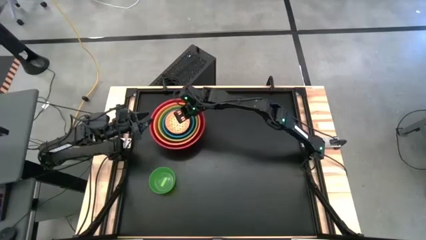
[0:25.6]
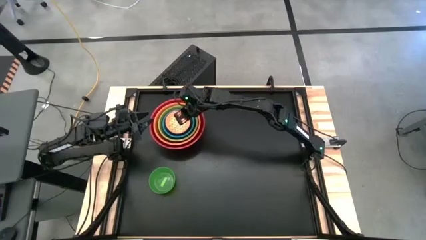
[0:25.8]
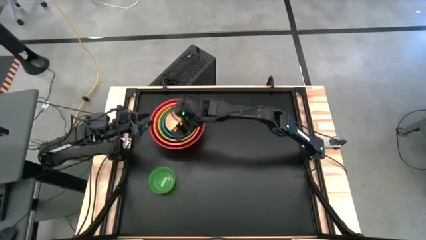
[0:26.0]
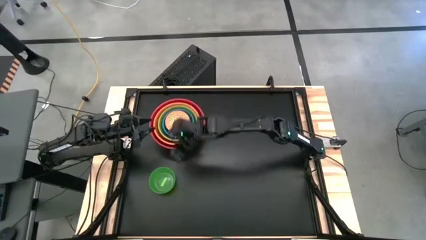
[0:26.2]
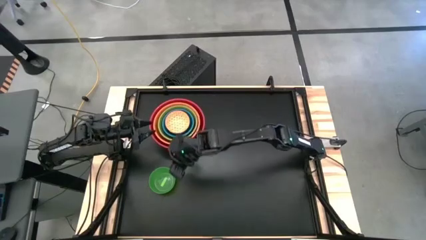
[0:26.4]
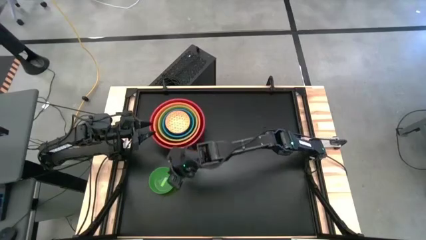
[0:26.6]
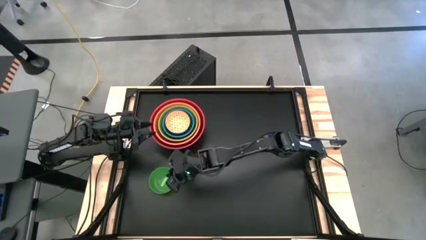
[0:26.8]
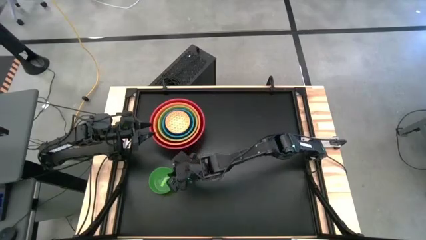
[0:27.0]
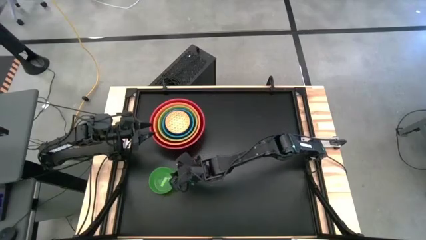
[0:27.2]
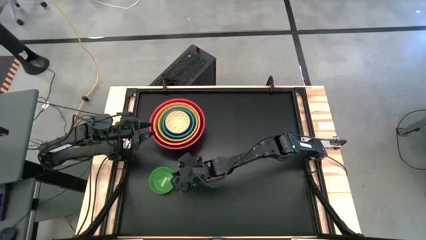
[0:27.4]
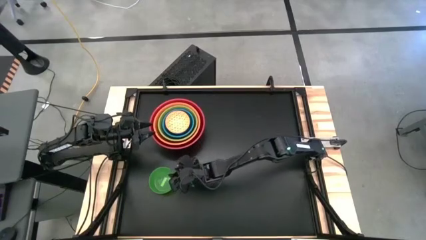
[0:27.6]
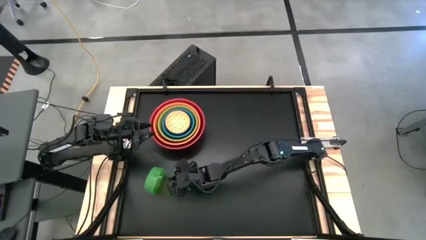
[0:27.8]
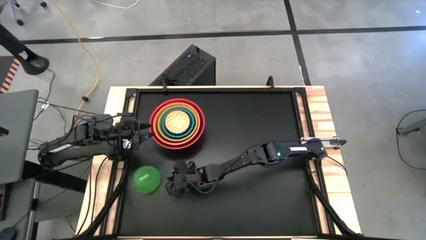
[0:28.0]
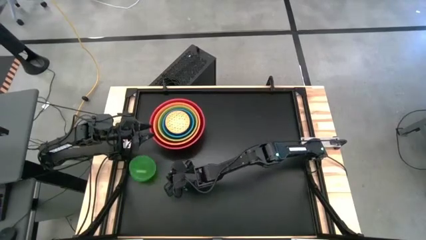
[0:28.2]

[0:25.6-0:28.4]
Stack the green bowl on top of the orange and blue bowl

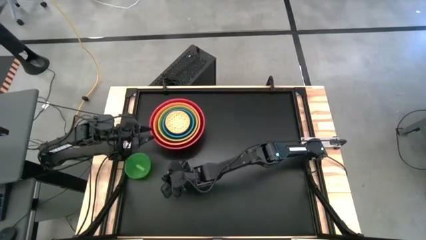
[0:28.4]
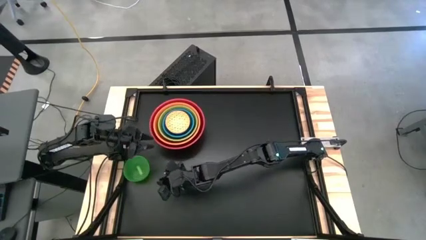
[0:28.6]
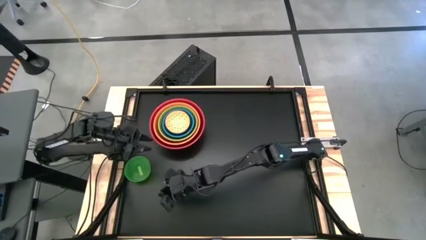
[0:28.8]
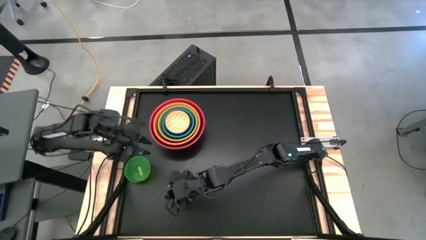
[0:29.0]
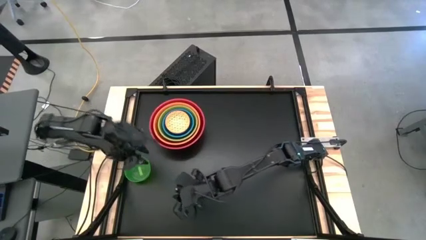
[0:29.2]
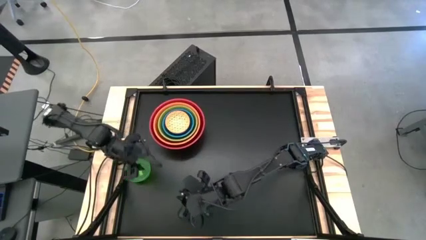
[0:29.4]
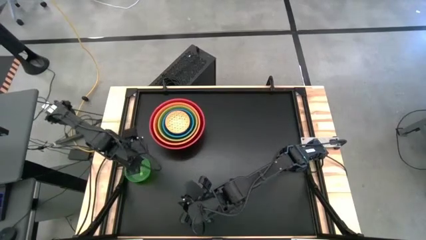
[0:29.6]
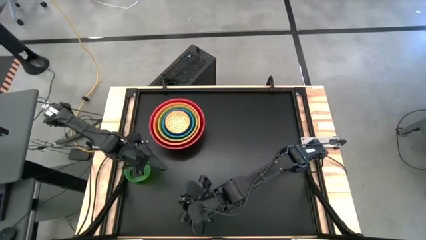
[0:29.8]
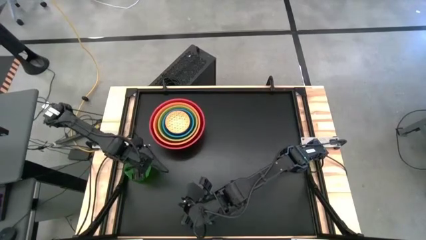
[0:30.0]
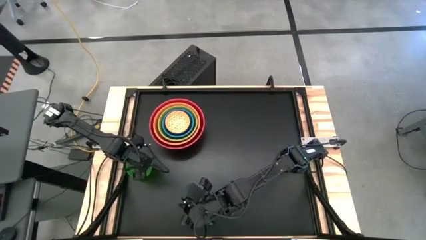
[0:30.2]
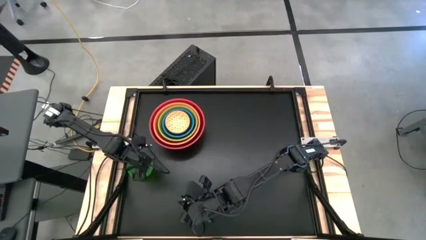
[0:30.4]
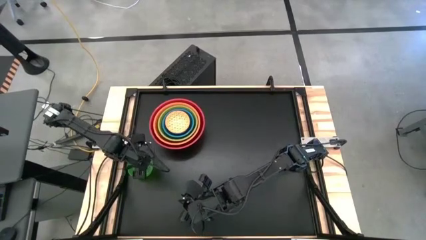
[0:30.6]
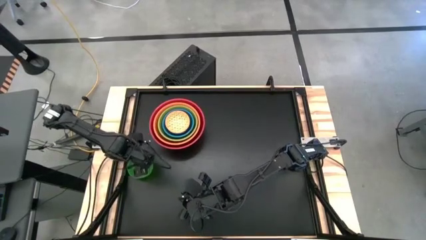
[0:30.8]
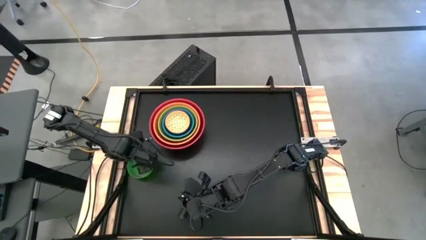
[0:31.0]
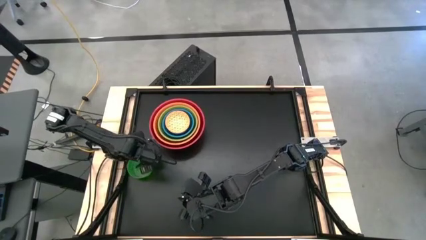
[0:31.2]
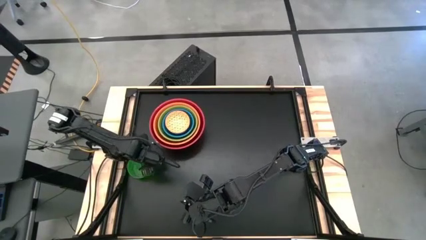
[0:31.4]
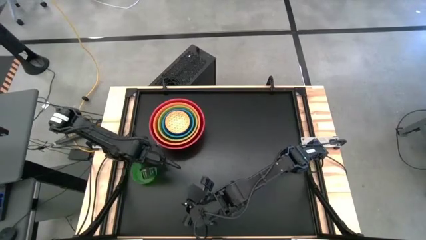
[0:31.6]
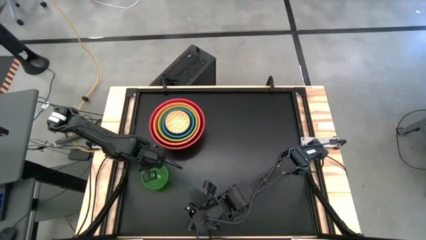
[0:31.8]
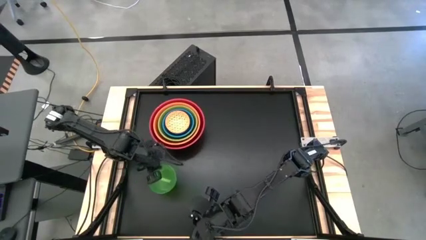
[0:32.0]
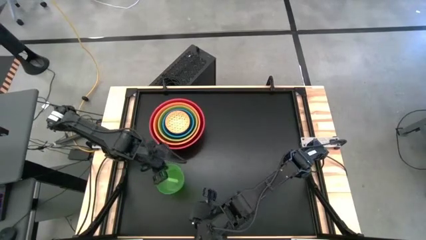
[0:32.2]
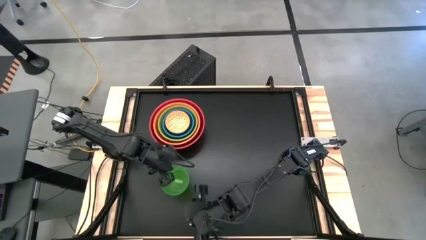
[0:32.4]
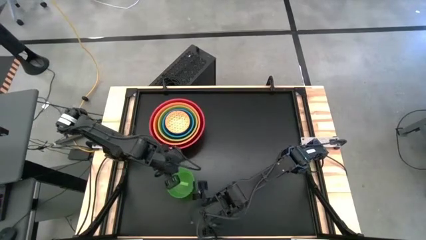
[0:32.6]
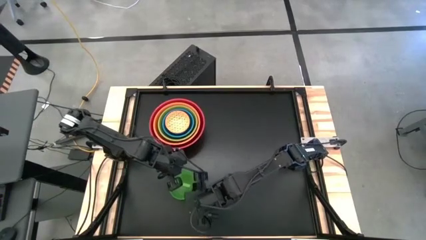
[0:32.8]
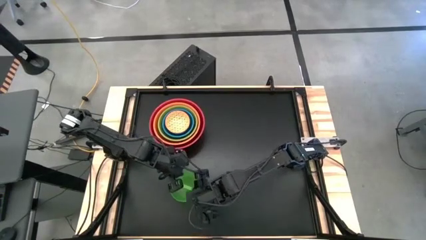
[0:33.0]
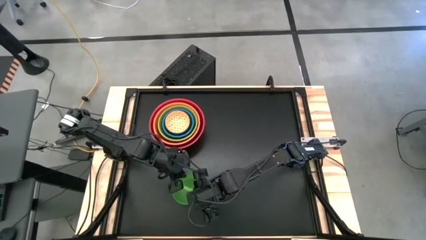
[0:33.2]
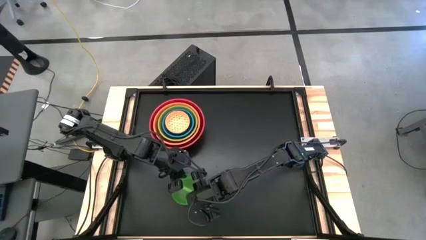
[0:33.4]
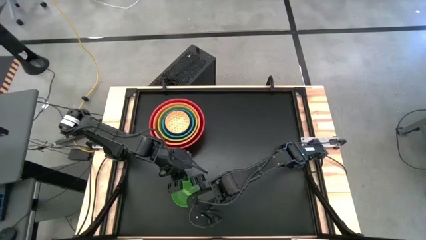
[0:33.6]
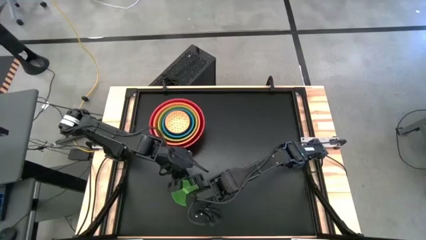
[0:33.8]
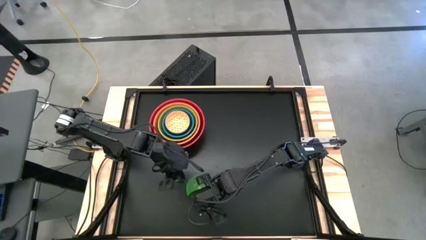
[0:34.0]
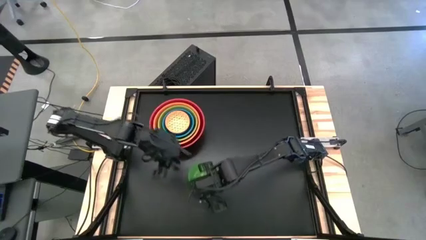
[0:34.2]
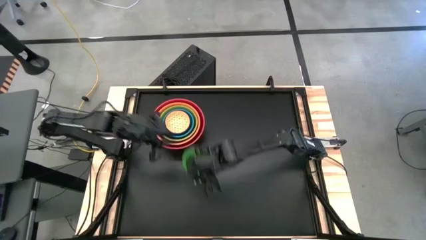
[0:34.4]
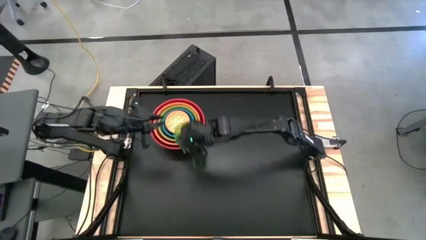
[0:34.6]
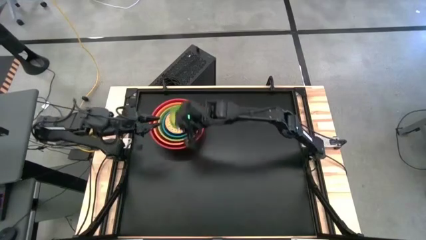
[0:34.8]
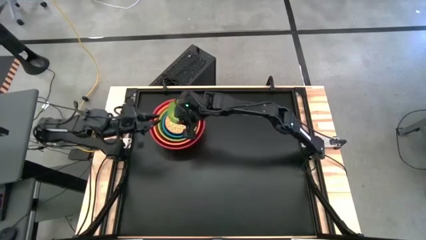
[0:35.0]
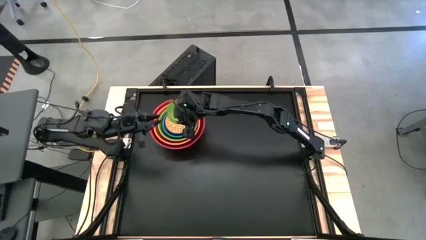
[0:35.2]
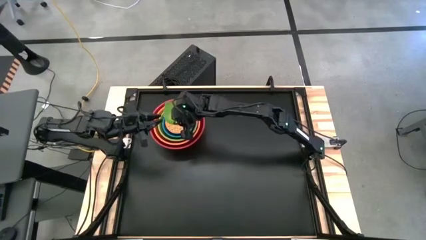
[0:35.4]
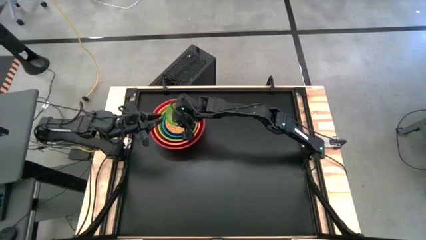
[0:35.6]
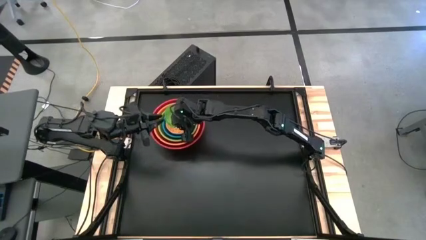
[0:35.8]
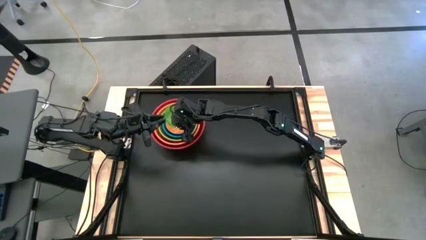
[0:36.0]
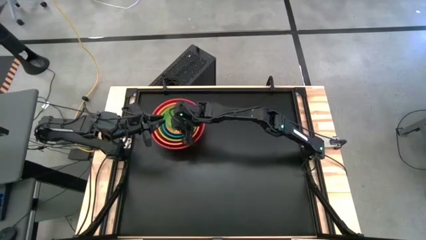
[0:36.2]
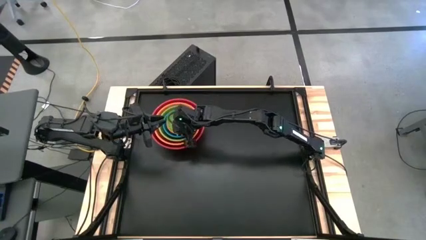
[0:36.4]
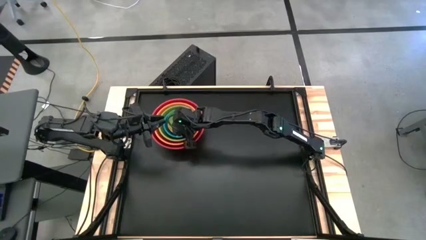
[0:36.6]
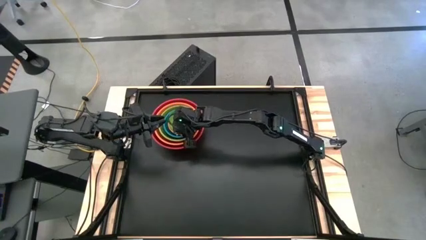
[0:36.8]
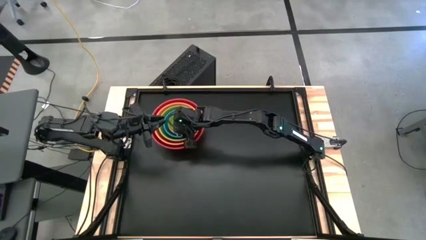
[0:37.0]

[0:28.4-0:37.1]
Stack the green bowl on top of the orange and blue bowl

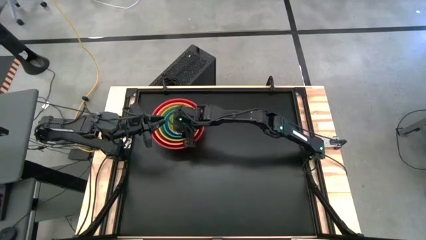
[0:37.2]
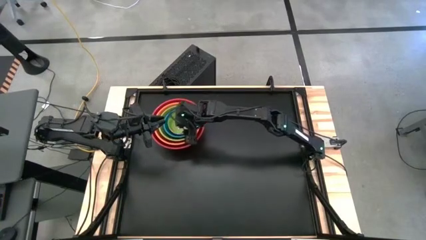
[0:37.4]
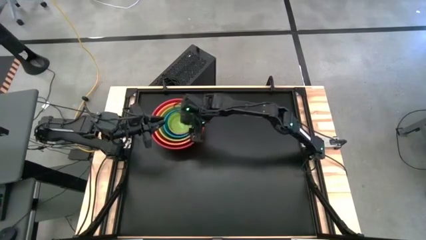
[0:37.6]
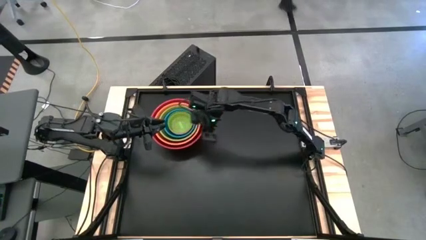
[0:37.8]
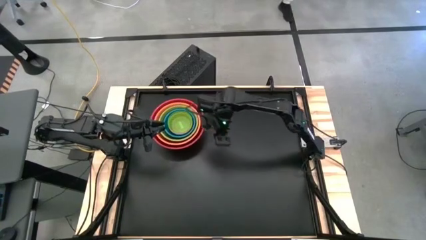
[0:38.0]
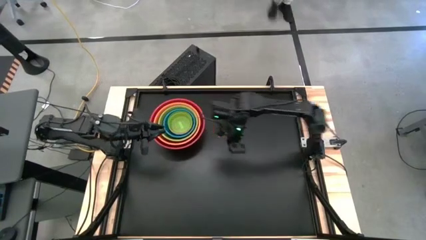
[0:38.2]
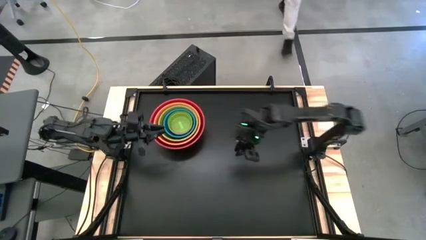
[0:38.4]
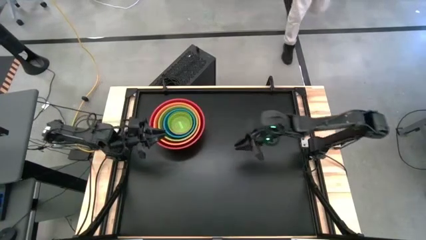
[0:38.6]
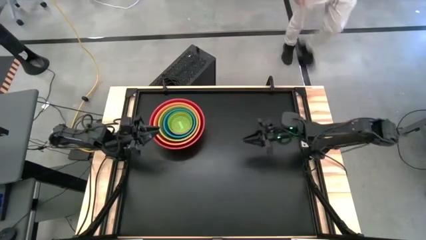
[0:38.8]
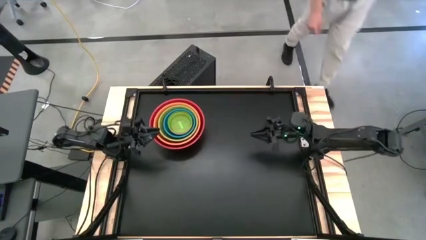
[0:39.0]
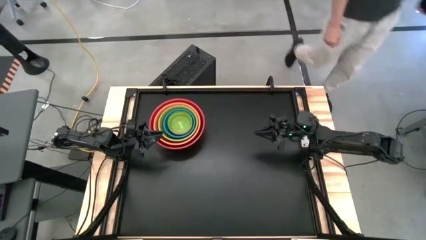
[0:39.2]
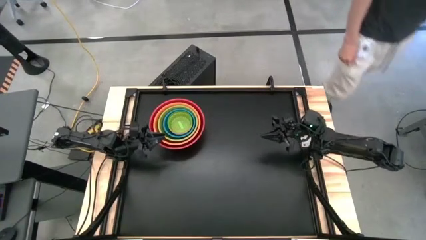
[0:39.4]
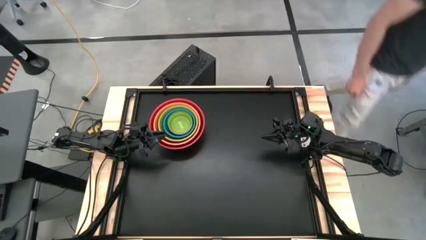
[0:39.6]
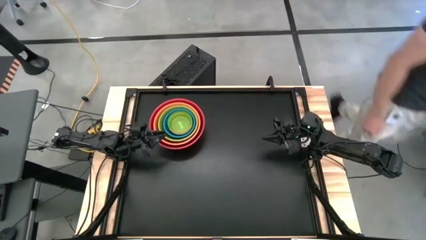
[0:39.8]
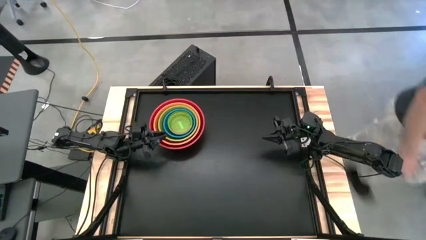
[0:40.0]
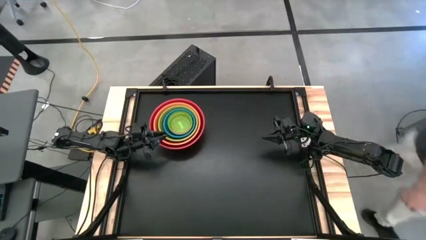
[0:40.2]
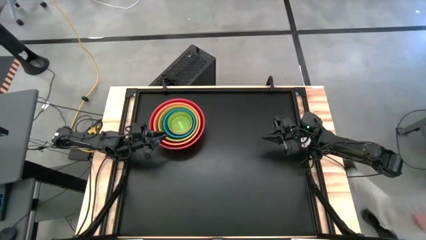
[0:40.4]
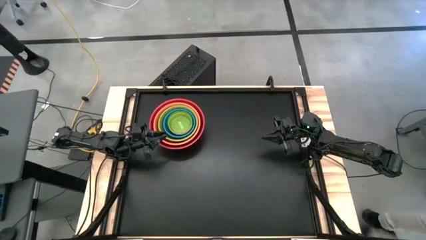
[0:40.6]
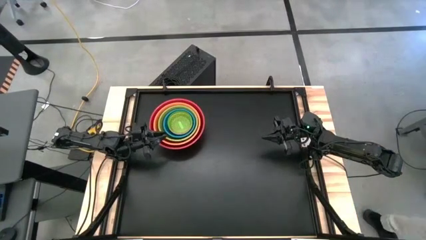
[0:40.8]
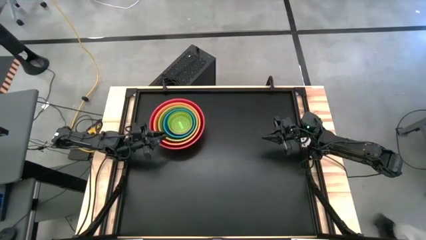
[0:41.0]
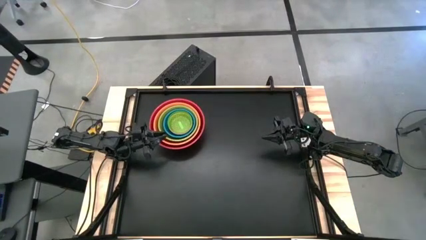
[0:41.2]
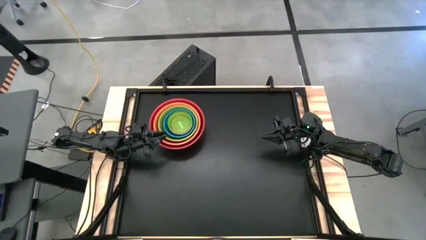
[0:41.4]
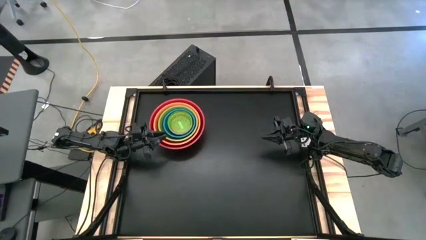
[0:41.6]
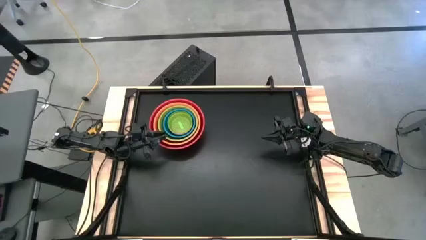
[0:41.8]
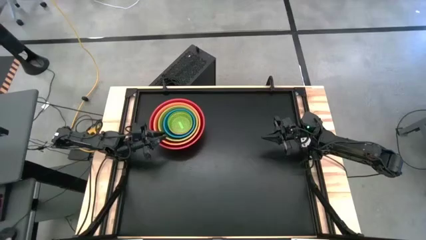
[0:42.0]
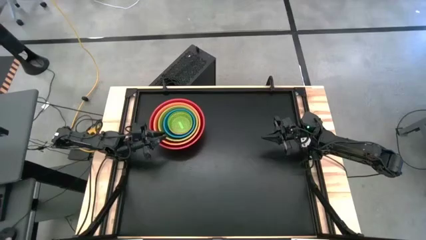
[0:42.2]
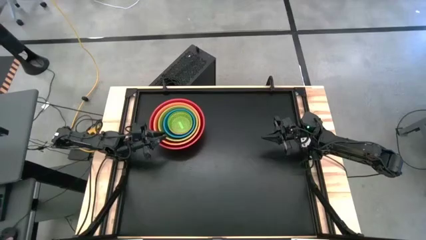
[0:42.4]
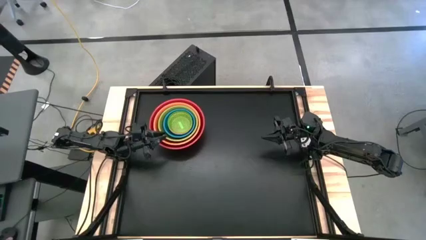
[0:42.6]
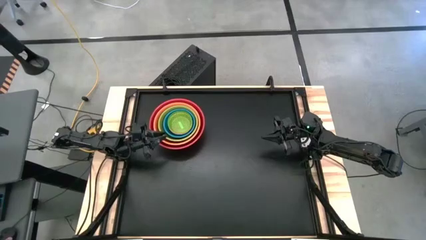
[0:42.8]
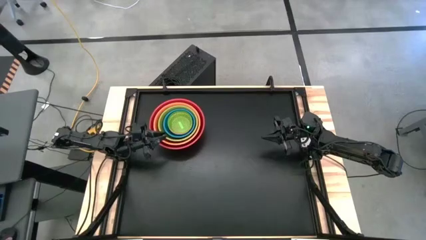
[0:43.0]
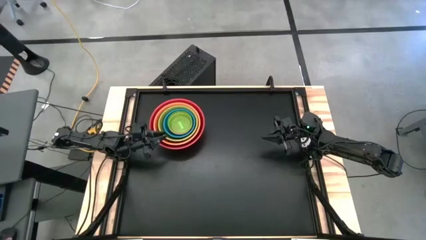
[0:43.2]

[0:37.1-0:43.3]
Return to Home Position
